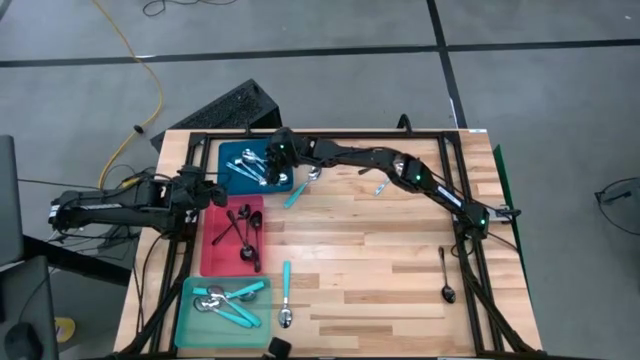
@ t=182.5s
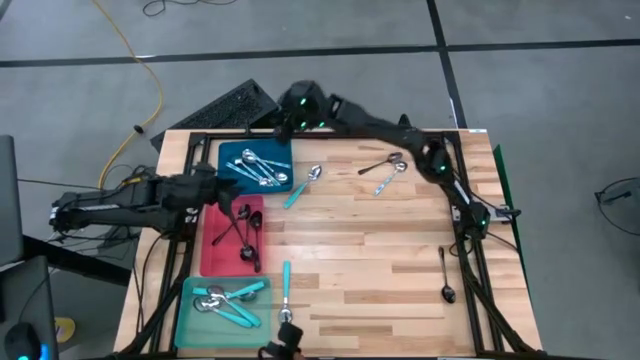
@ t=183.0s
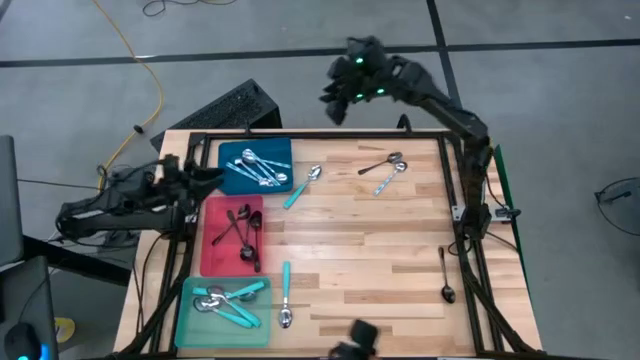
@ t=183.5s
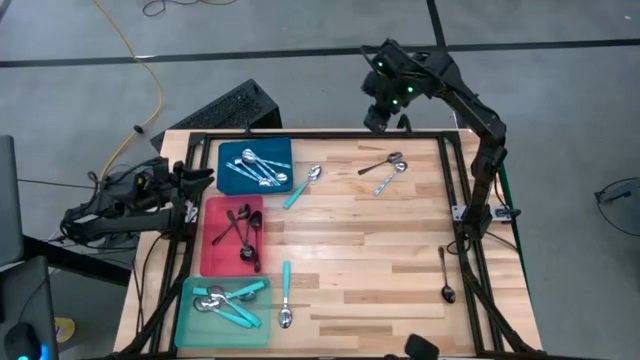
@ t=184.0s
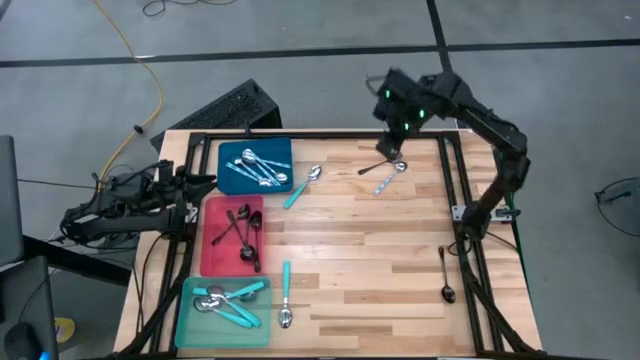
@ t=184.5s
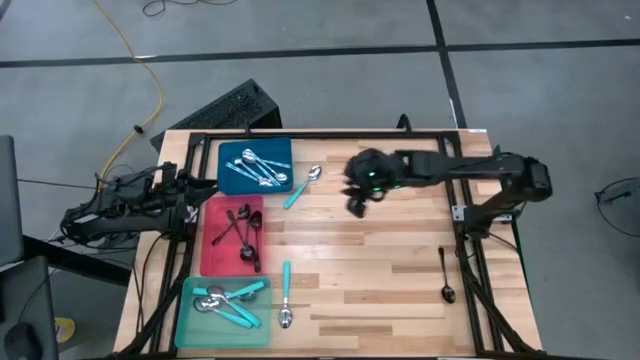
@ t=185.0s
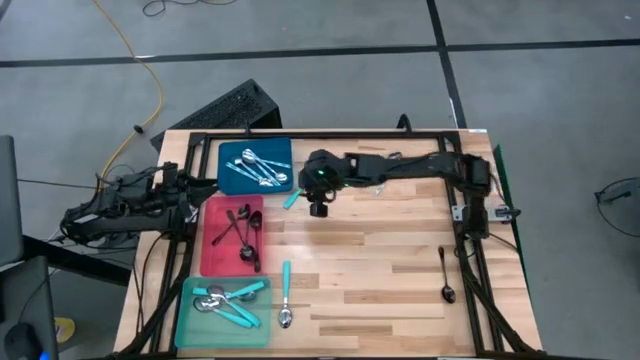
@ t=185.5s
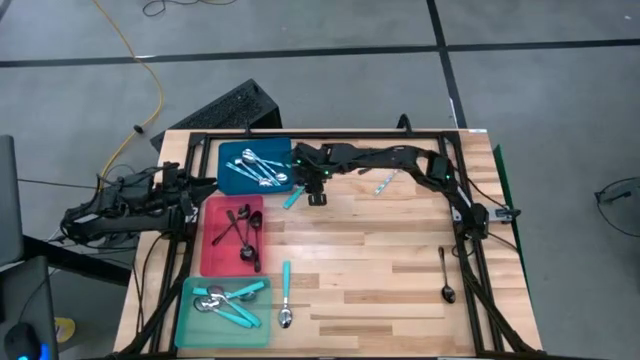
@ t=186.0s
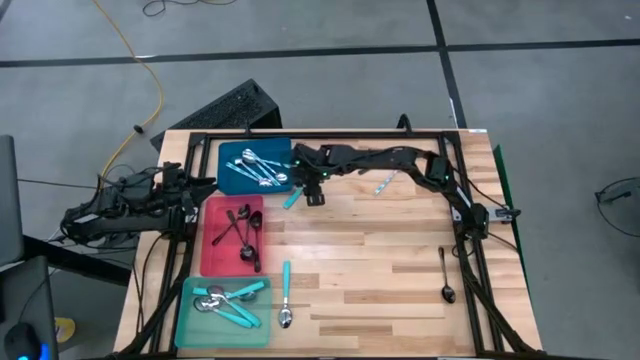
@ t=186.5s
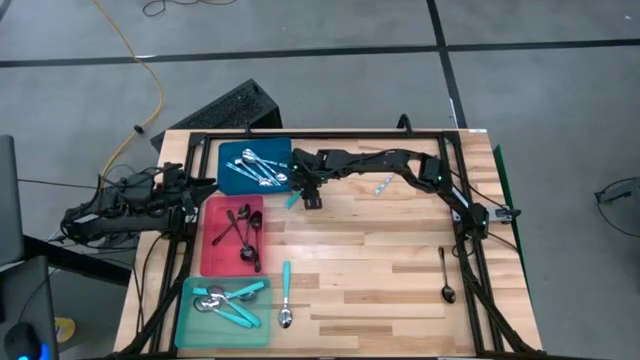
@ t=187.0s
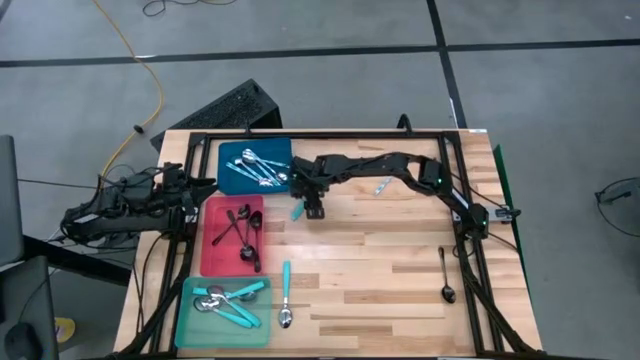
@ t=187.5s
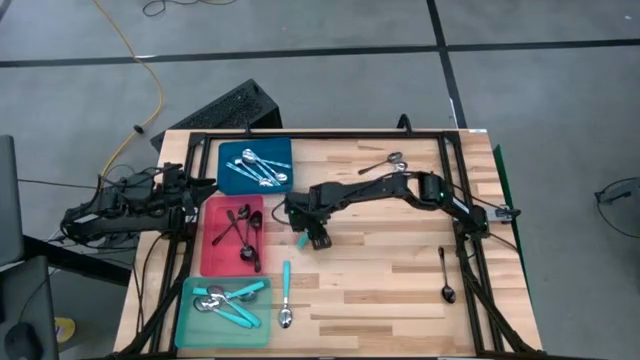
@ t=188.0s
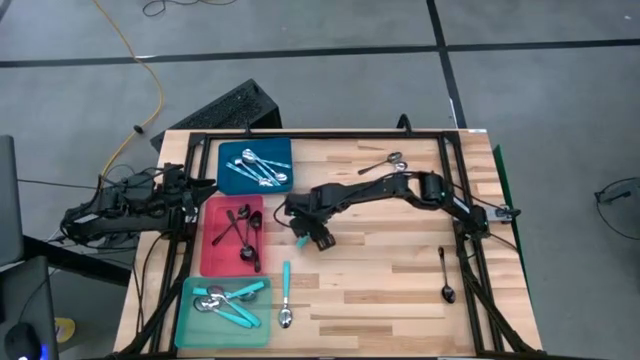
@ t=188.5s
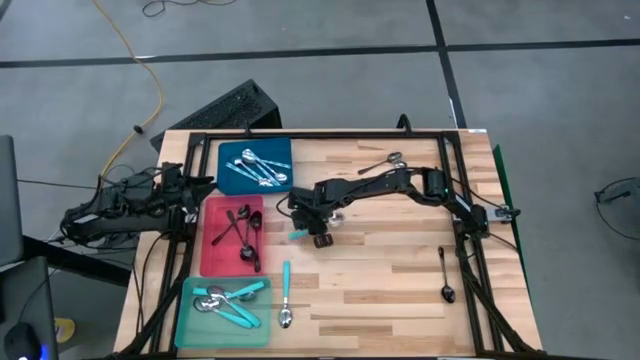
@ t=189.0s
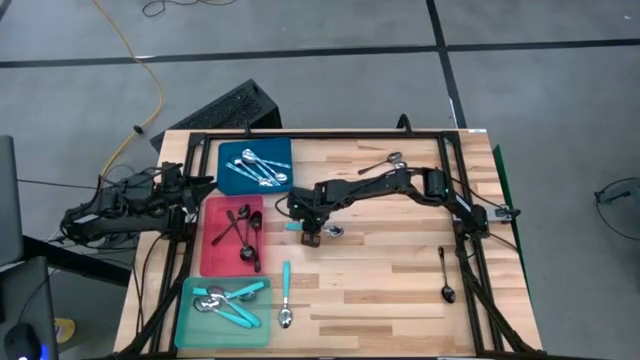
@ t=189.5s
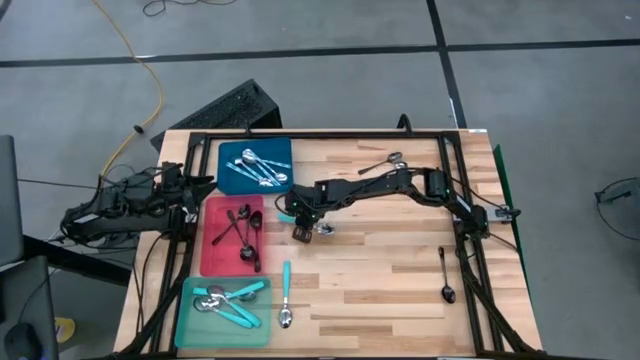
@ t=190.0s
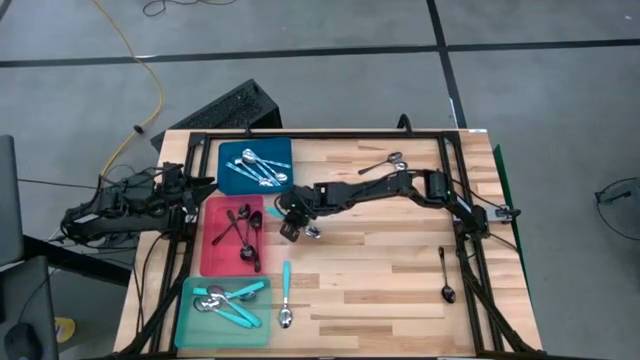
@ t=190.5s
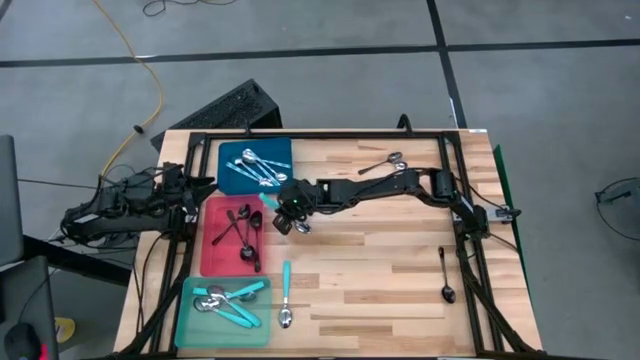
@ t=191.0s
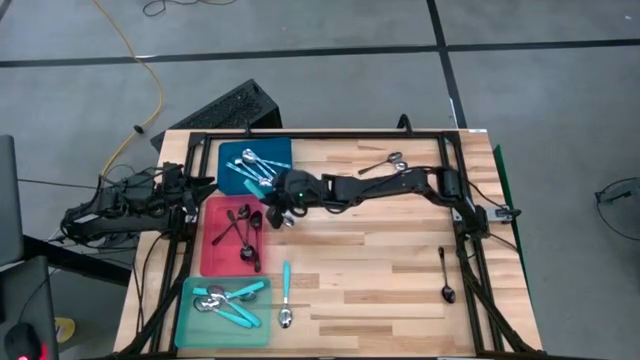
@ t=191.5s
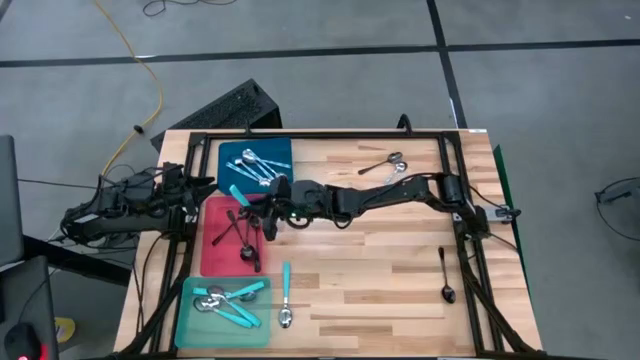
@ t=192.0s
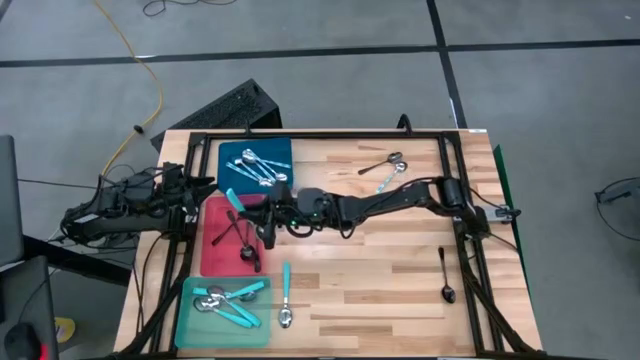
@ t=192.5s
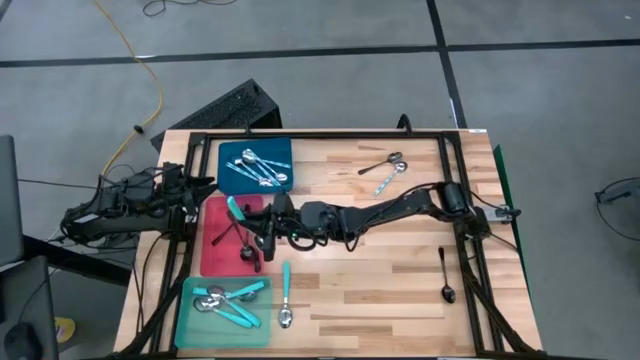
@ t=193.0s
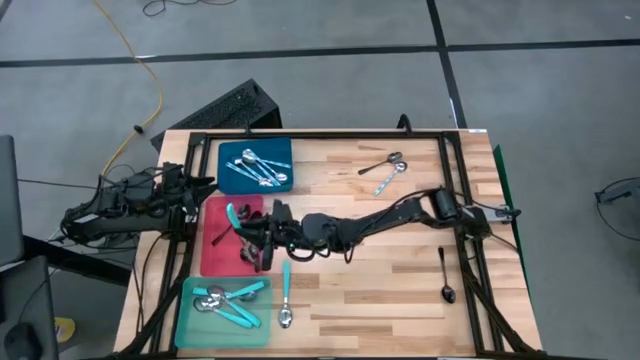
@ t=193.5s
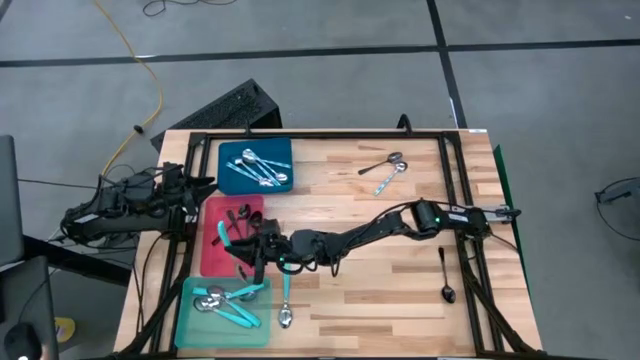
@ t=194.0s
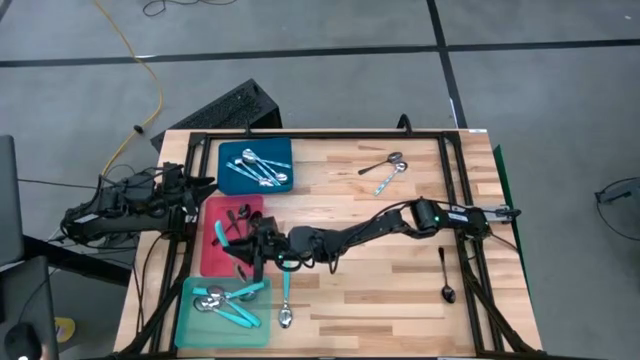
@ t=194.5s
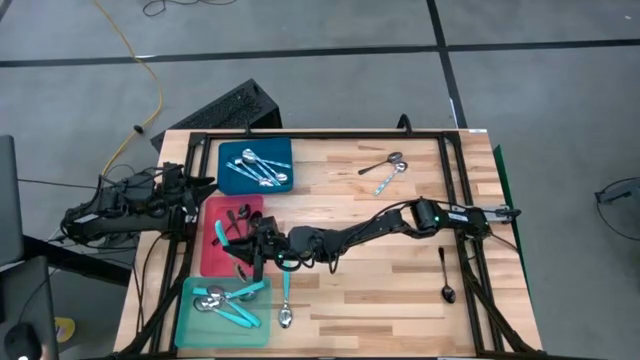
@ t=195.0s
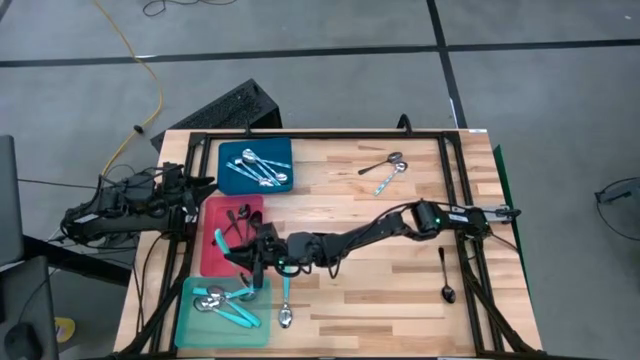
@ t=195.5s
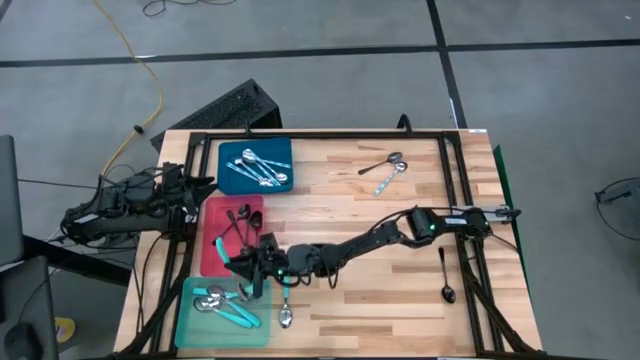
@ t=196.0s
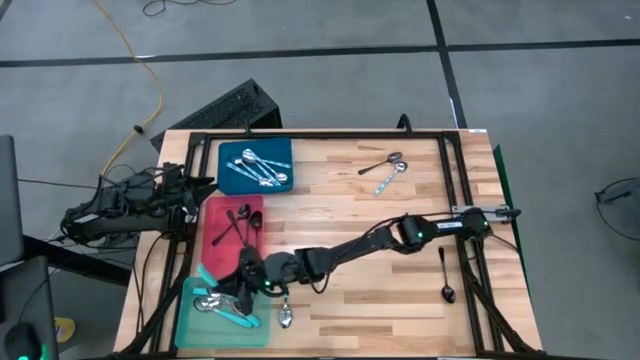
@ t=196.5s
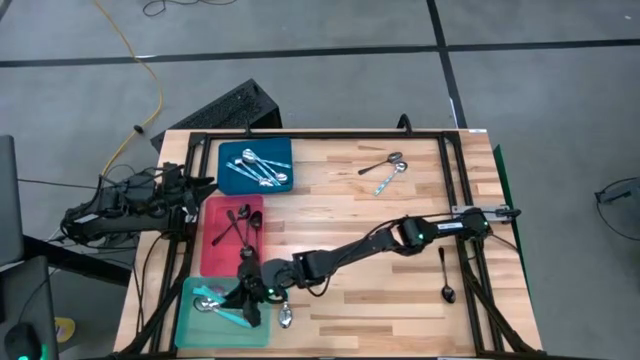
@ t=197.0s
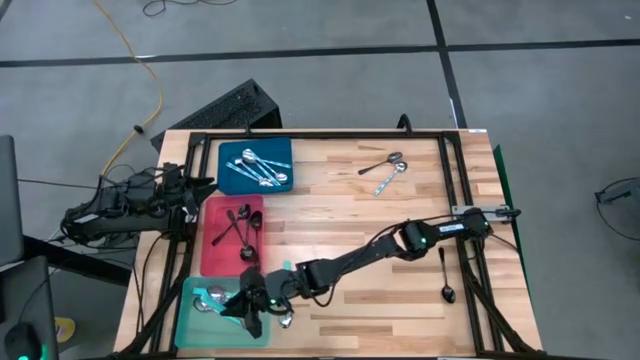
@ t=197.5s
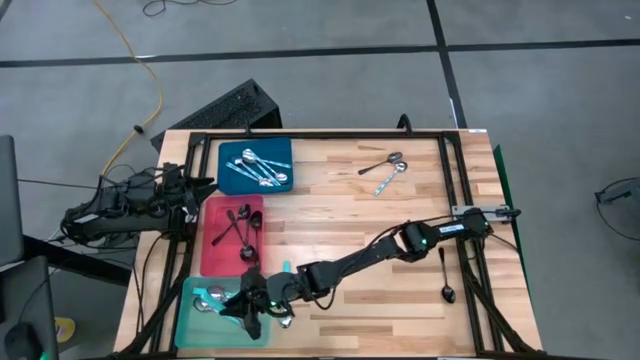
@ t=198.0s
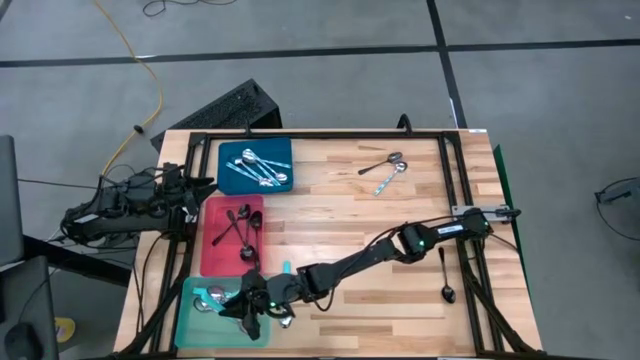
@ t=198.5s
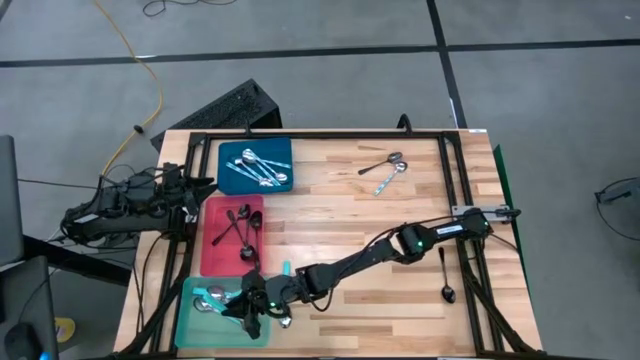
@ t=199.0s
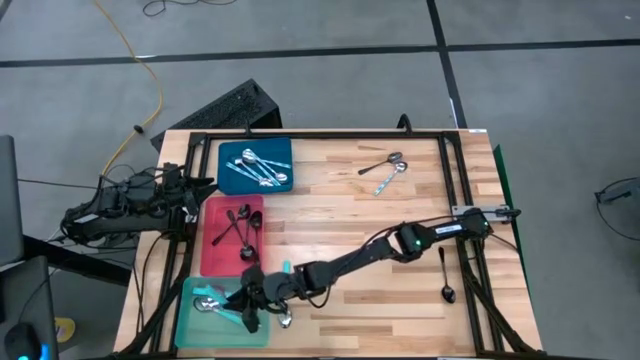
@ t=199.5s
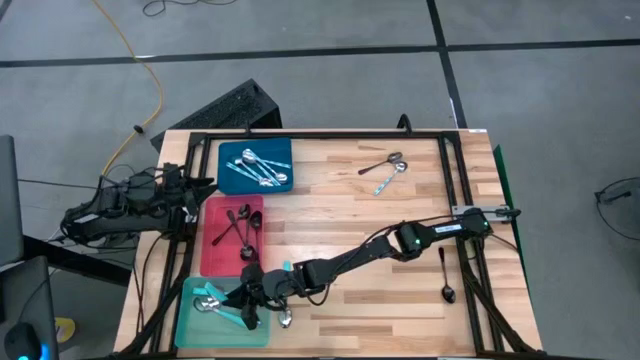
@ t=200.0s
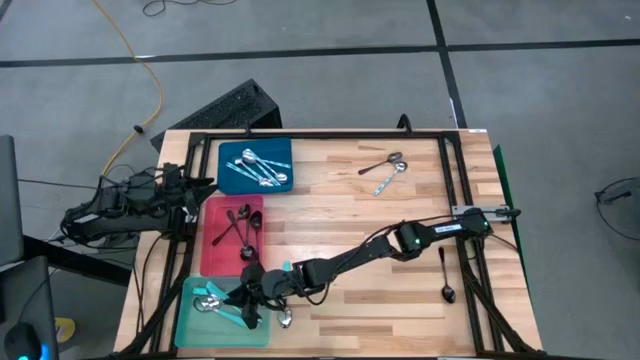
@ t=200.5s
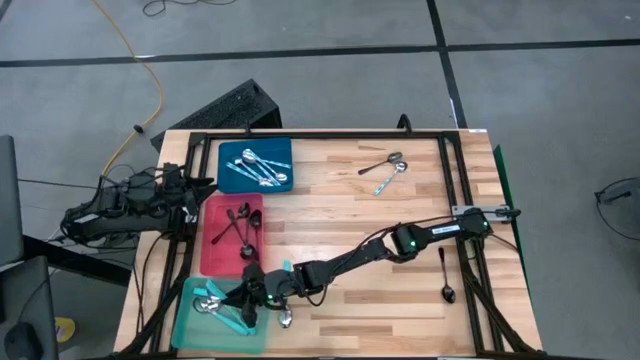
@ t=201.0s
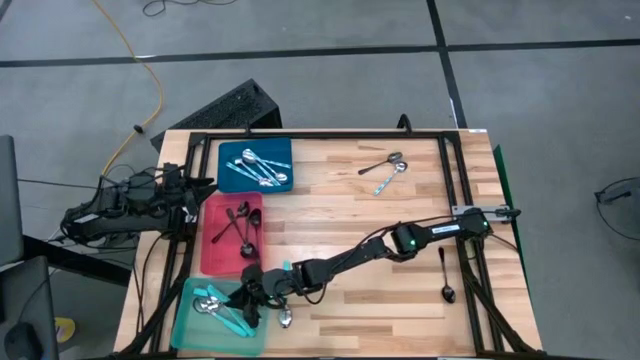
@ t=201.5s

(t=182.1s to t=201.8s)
Task: Sort silverware by color (type)
Put the light blue spoon into the light blue bin
